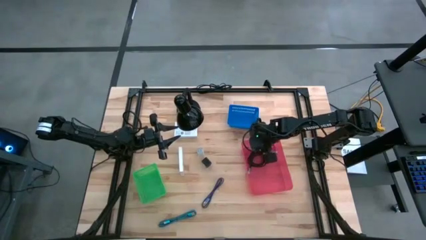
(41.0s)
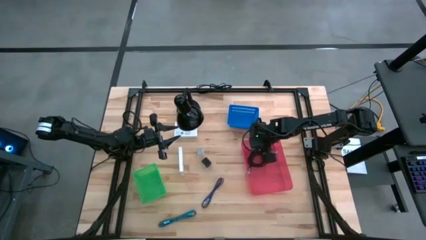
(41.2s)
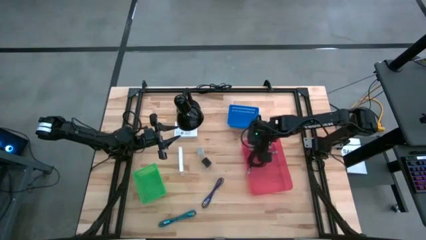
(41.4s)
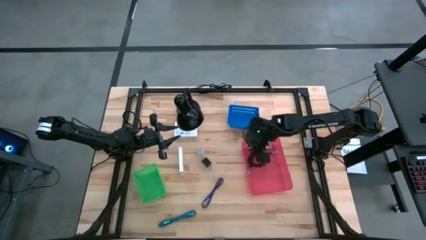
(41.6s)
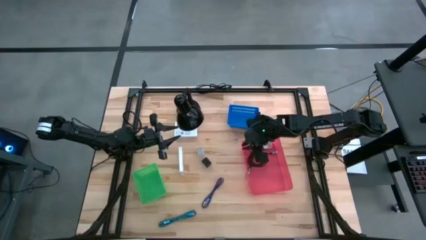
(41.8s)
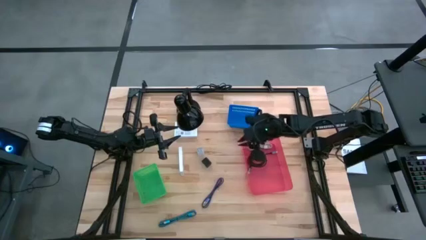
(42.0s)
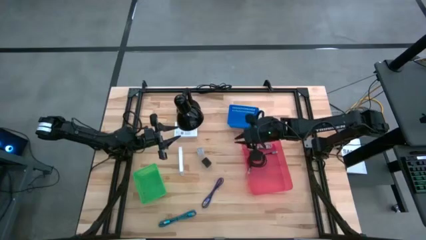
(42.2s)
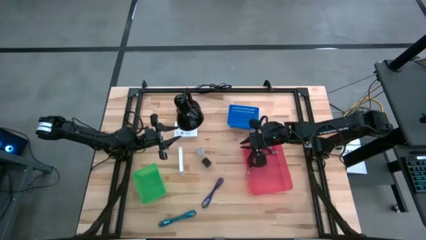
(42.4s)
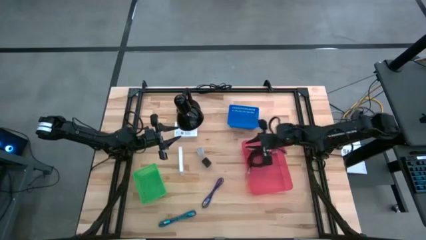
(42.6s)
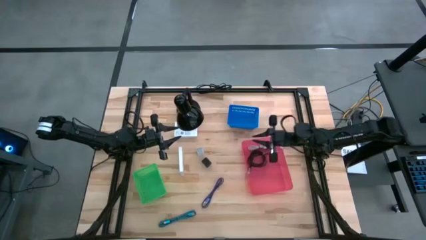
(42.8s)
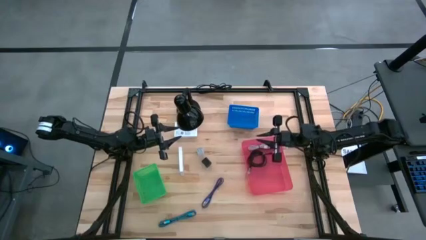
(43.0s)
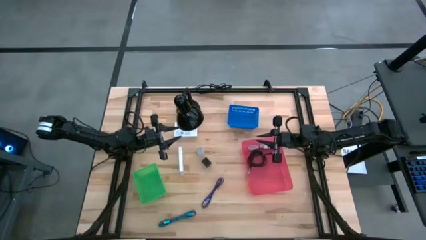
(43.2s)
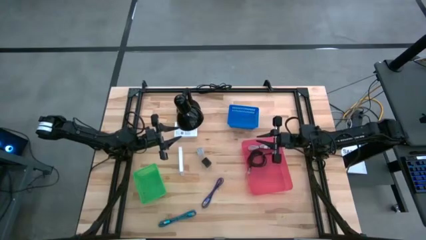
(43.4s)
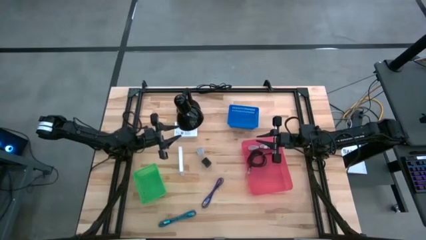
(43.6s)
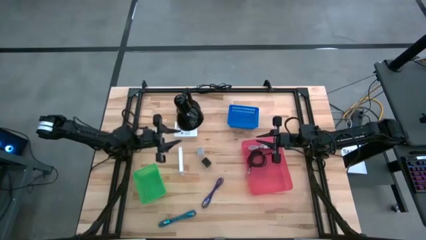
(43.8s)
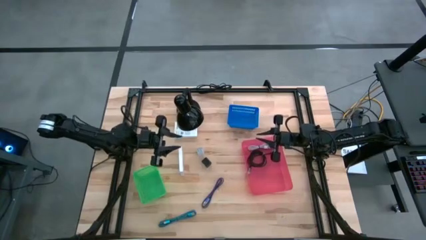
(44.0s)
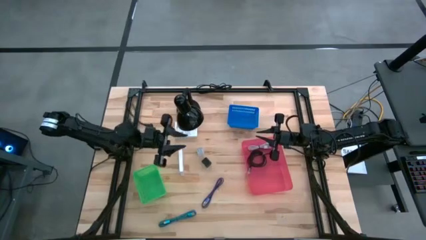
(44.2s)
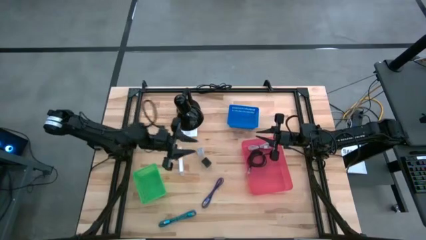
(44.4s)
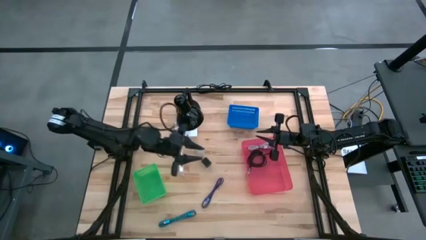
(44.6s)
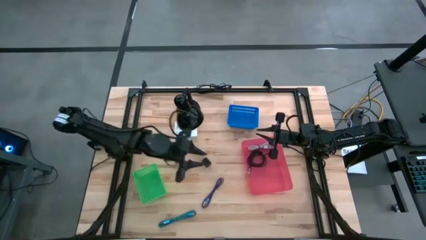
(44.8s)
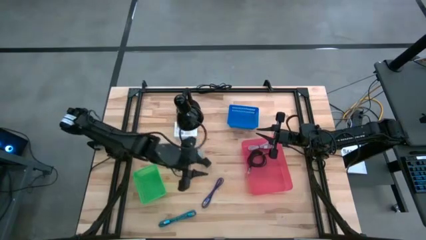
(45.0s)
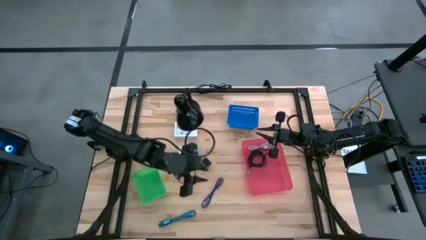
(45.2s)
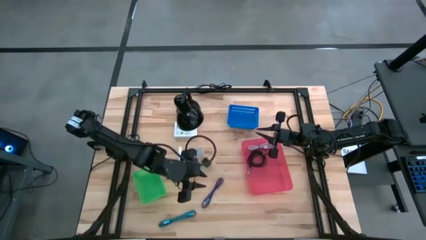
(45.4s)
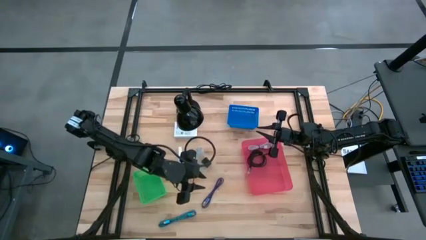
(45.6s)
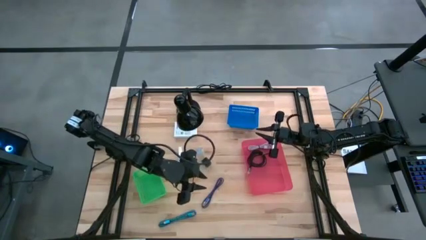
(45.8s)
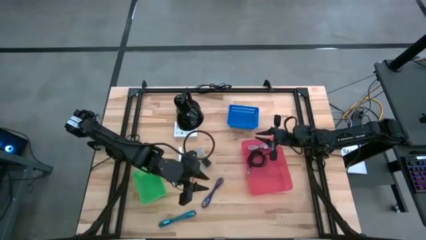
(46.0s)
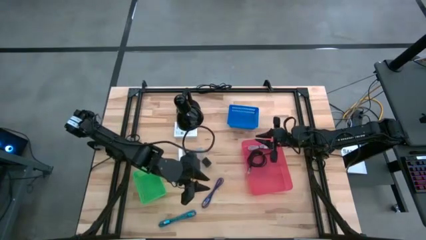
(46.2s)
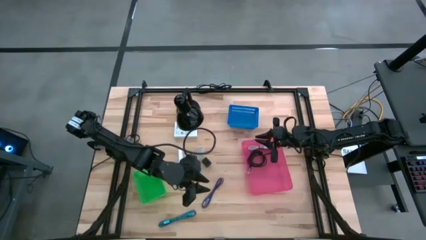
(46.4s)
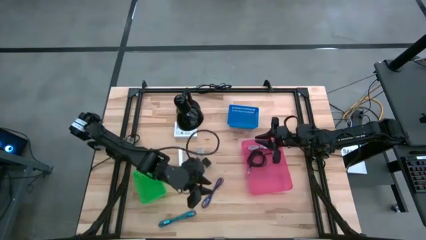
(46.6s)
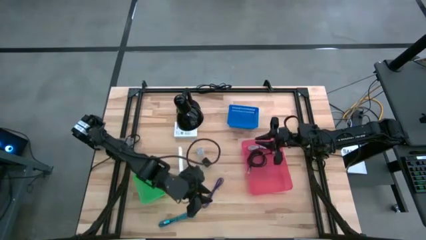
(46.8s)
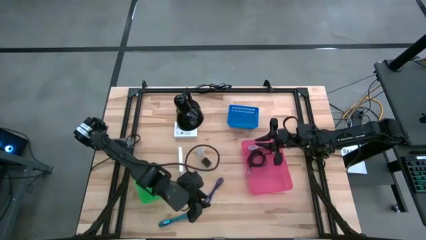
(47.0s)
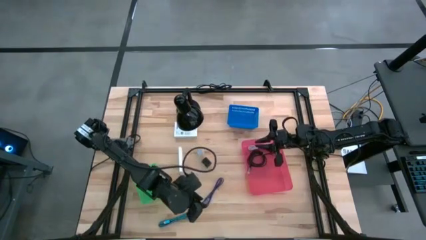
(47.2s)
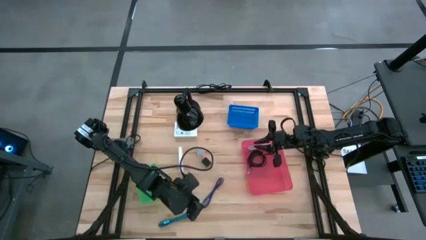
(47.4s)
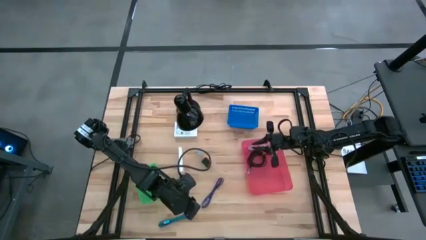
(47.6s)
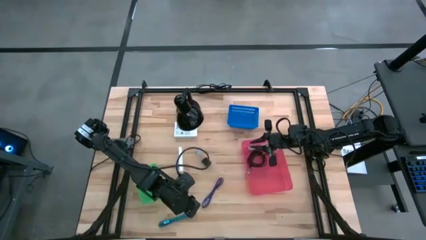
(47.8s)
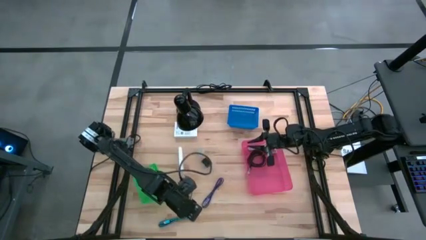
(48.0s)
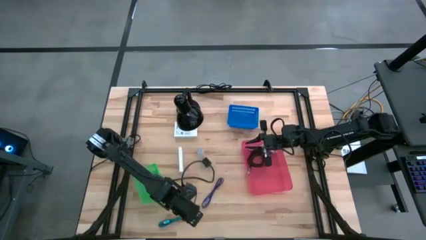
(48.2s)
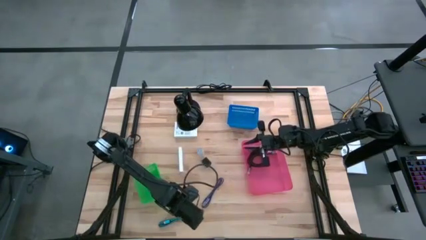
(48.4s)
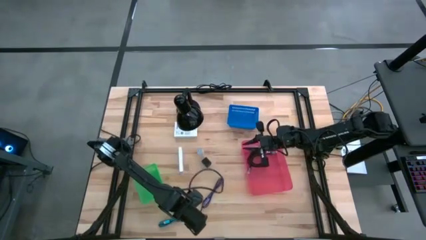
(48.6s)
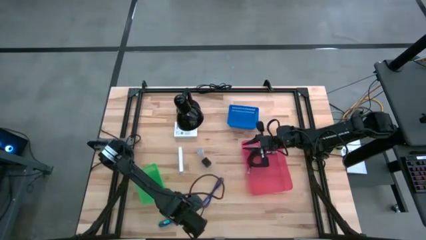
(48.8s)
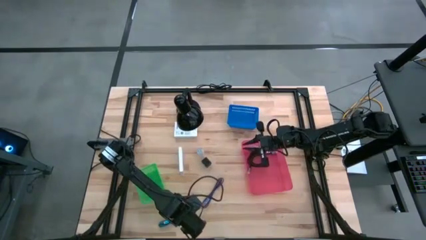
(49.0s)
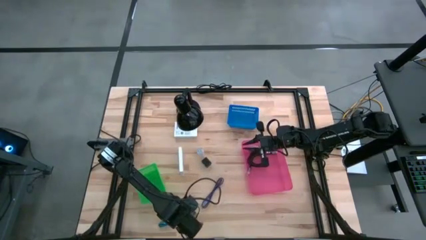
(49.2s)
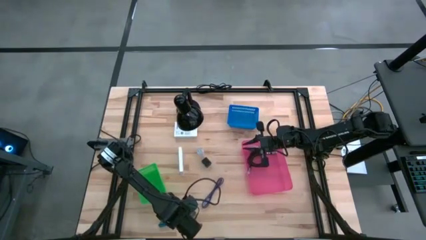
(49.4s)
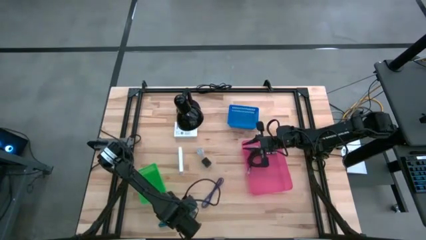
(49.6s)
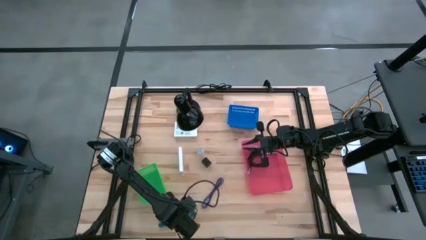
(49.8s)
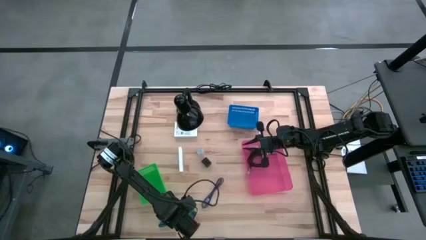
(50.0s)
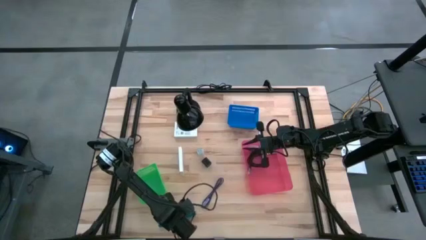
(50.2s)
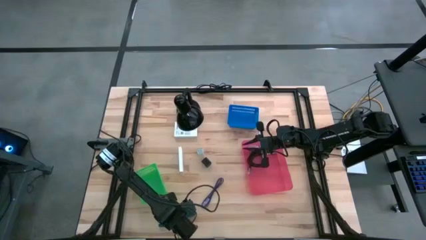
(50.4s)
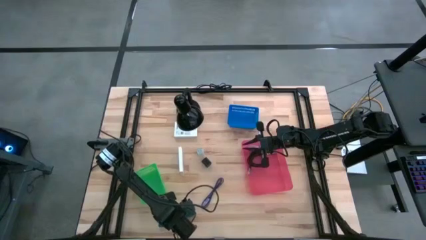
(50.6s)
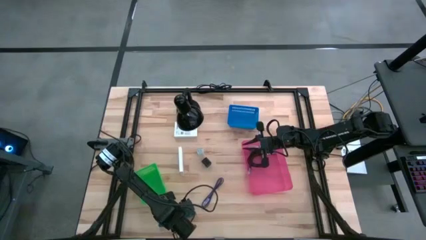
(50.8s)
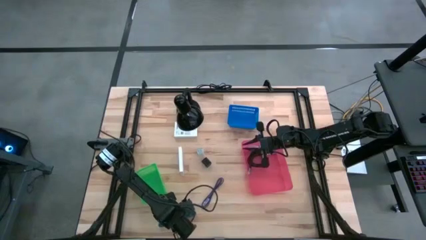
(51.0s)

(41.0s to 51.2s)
Task: Pick and place items into bin
Put the blue charger cable into the pink bin

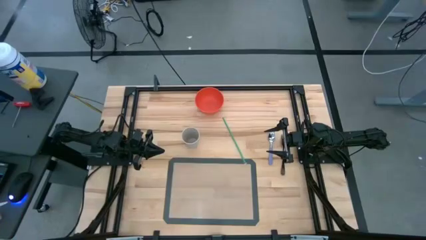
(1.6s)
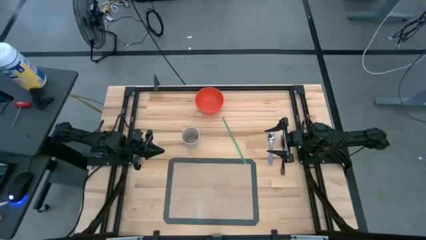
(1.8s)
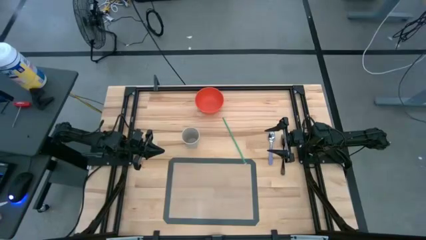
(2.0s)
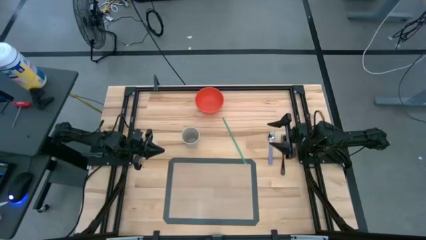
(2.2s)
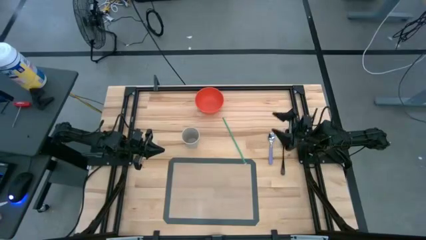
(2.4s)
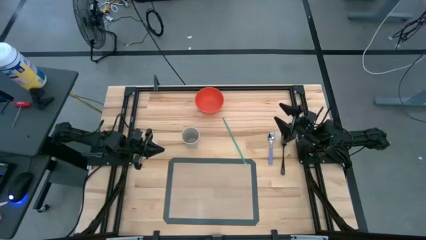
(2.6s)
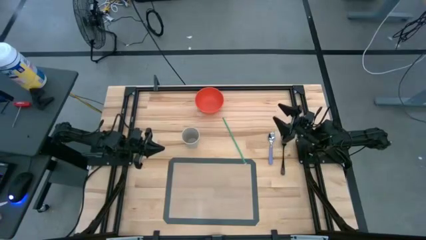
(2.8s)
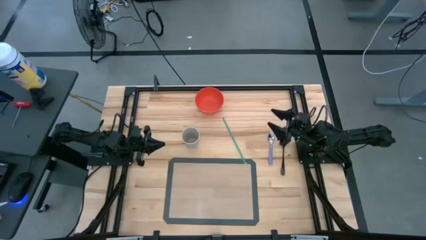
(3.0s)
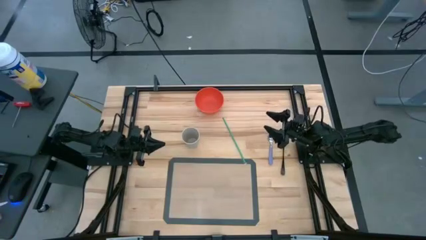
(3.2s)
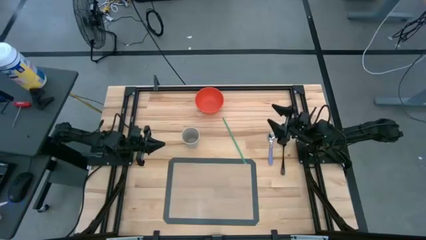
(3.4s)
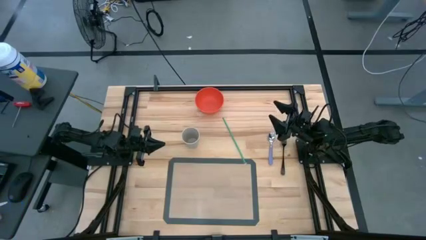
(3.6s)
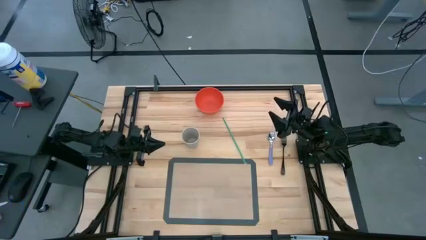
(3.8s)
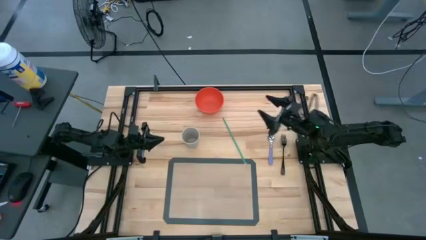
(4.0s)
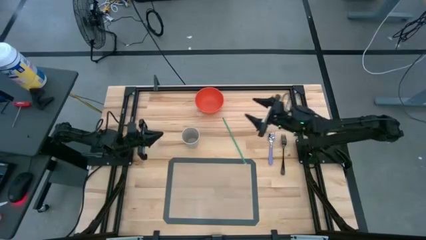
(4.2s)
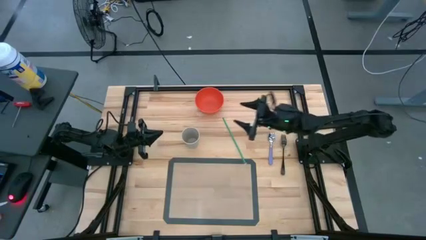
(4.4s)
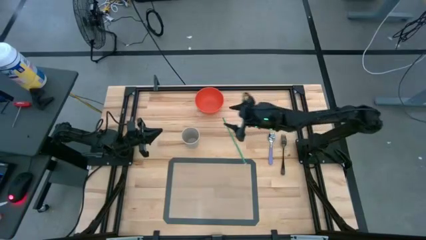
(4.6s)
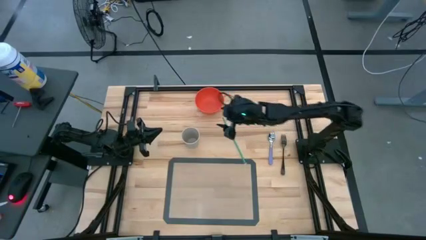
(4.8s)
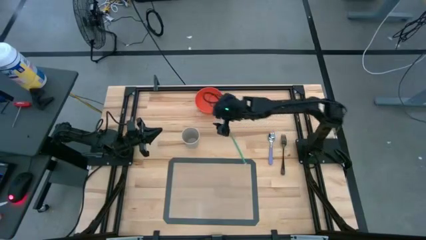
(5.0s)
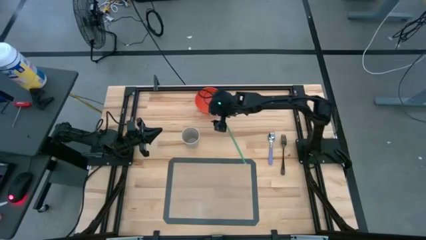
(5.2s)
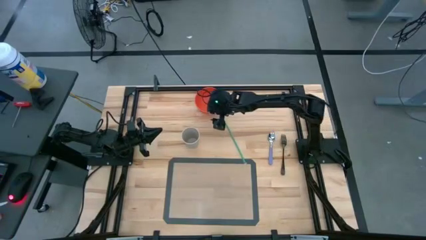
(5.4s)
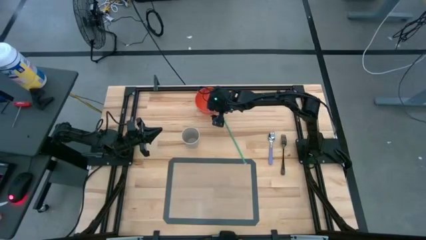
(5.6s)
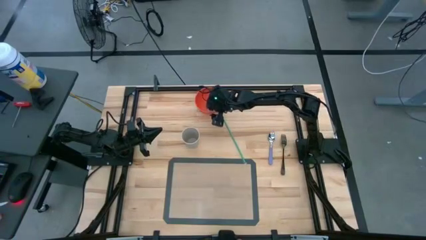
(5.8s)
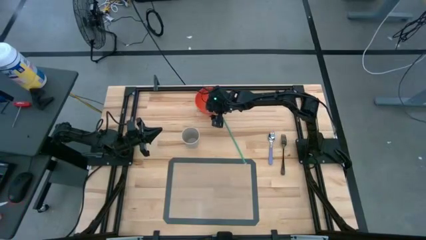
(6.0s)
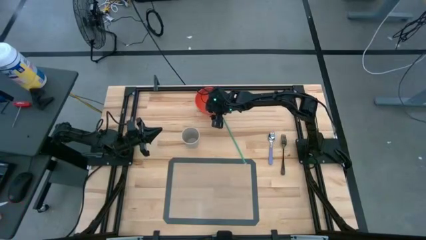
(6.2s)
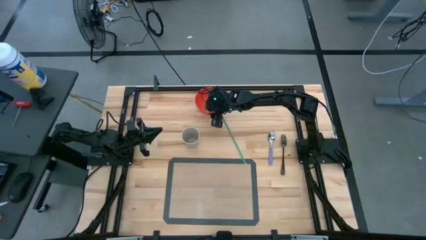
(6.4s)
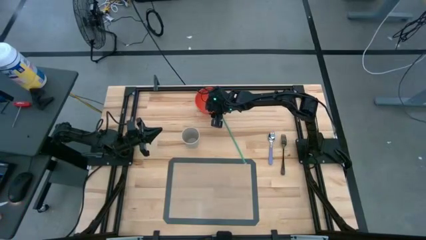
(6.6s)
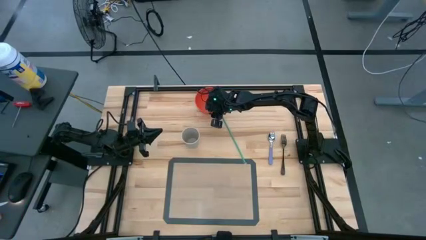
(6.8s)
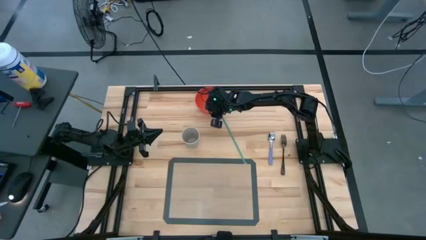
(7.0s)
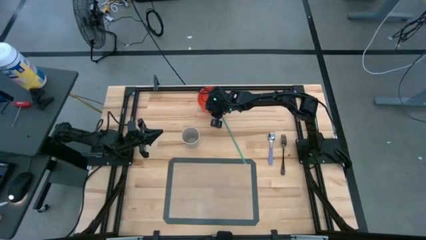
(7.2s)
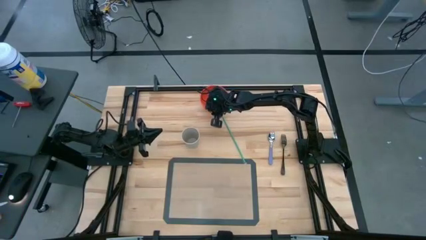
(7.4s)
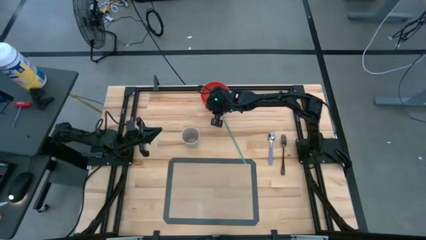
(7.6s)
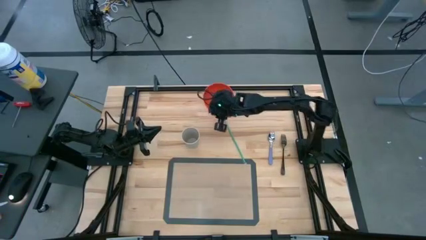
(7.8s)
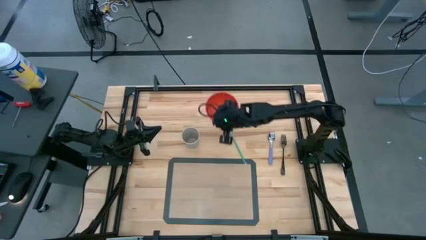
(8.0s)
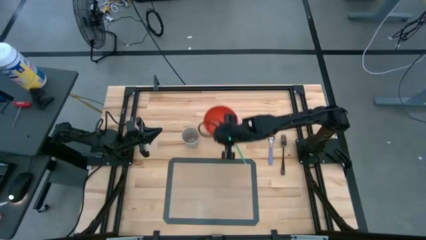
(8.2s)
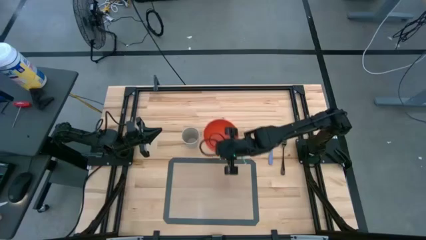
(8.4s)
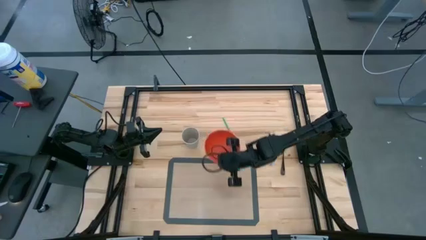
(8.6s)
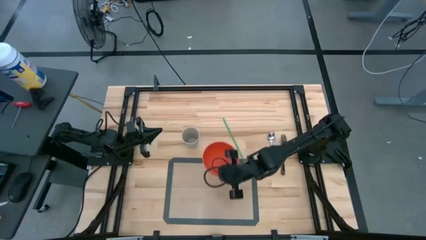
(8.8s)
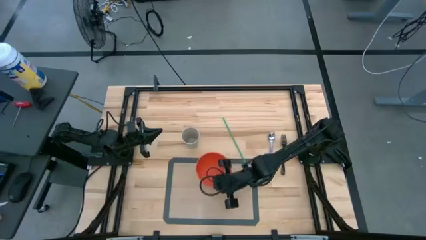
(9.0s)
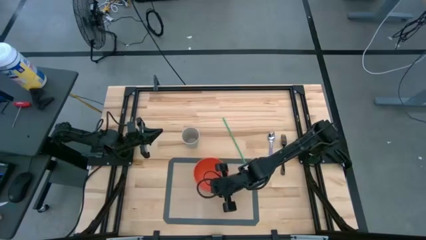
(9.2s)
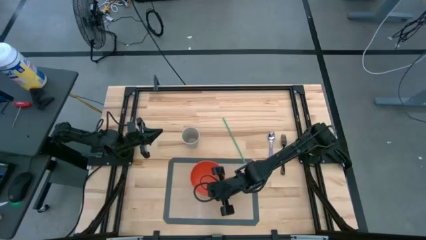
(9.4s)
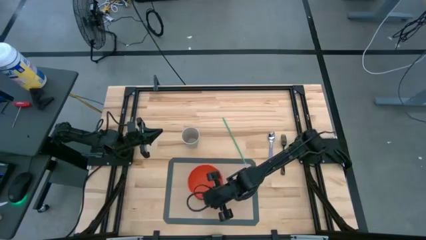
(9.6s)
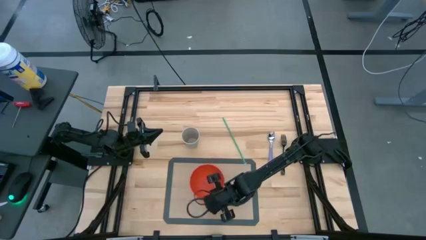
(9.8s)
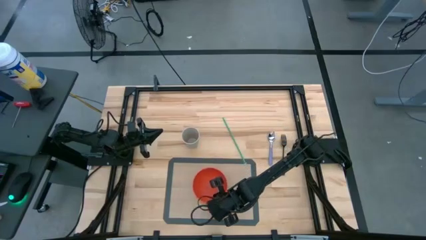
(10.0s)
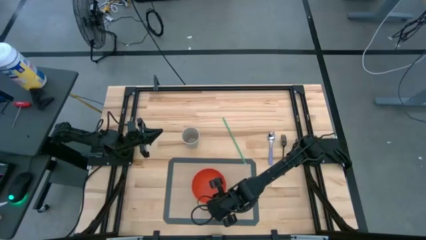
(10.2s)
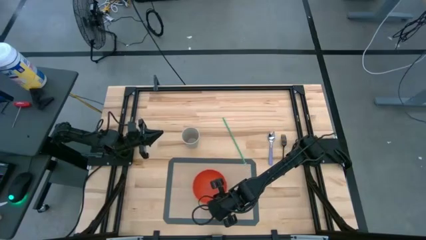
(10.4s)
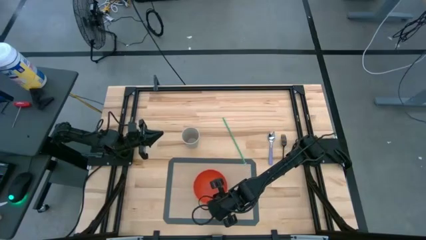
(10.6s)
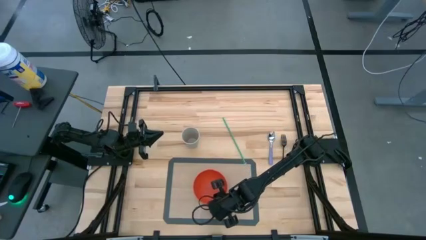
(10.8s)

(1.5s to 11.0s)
Task: Pick & Place Utensil
Put the orange bowl in the center of the transparent mat
